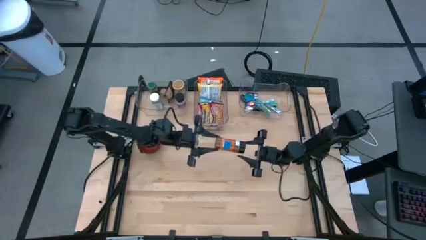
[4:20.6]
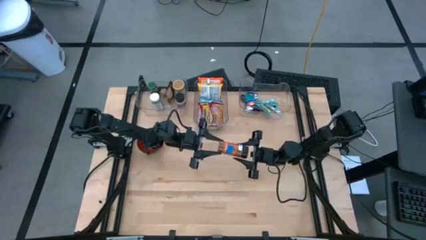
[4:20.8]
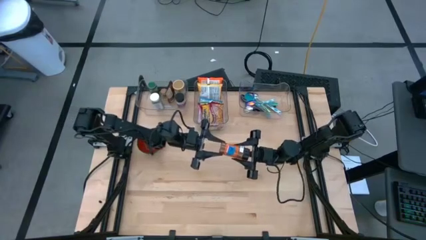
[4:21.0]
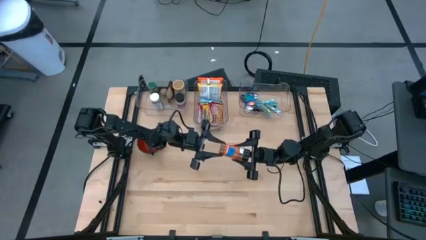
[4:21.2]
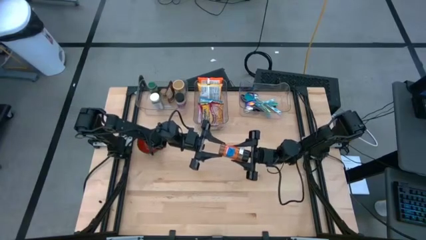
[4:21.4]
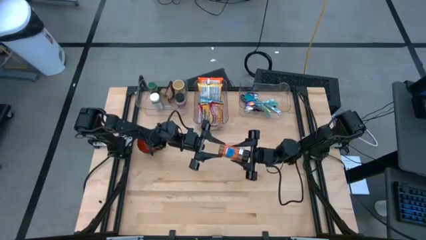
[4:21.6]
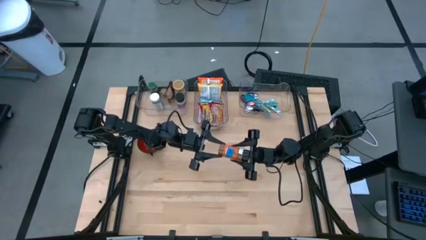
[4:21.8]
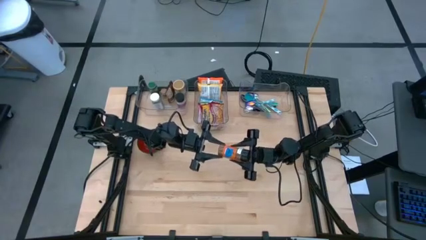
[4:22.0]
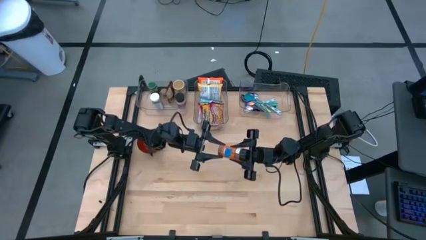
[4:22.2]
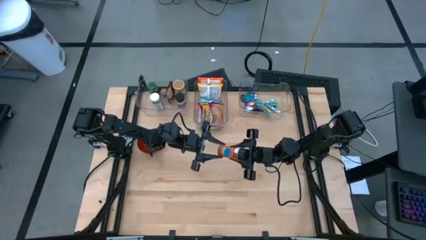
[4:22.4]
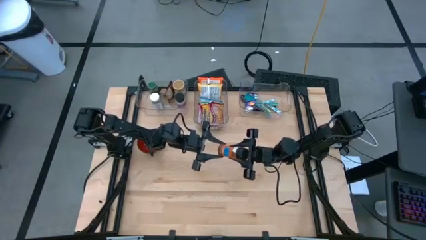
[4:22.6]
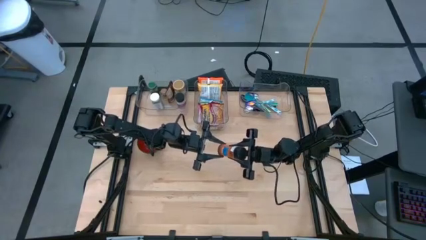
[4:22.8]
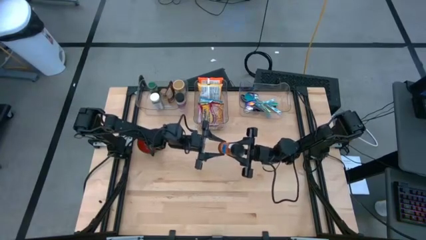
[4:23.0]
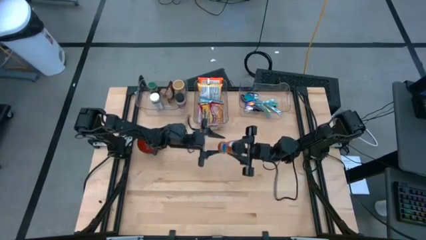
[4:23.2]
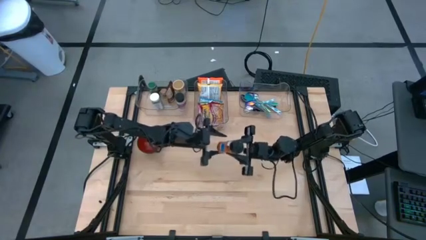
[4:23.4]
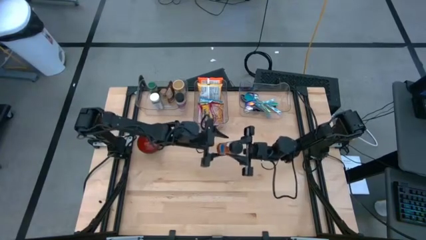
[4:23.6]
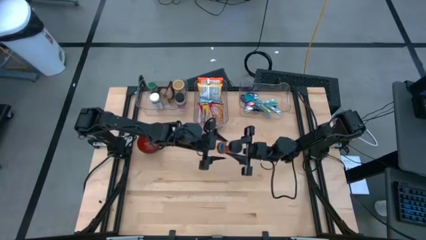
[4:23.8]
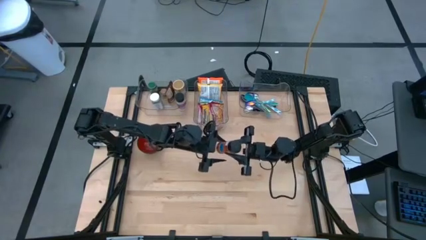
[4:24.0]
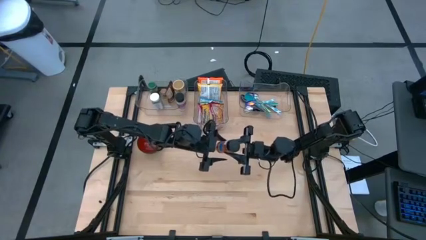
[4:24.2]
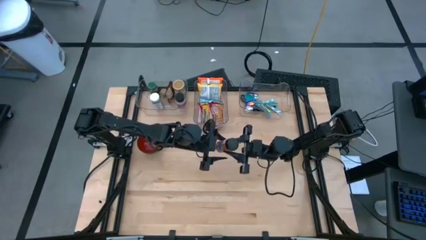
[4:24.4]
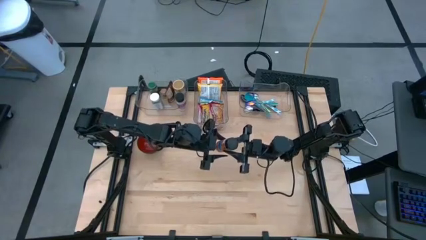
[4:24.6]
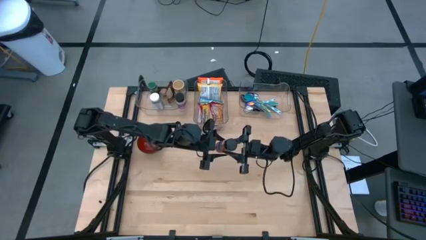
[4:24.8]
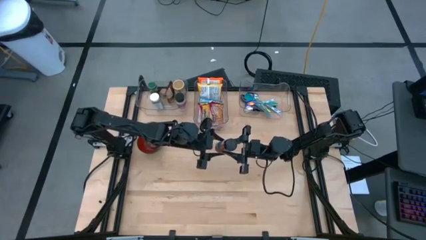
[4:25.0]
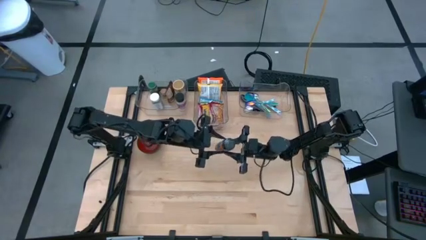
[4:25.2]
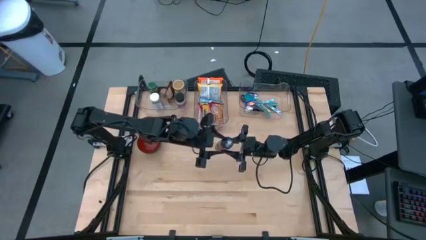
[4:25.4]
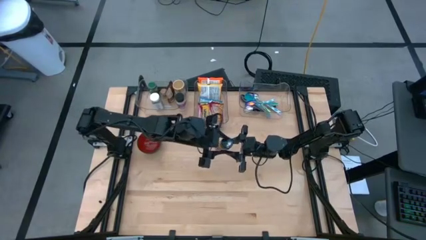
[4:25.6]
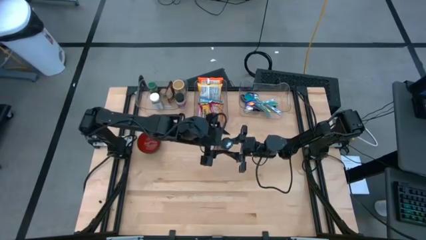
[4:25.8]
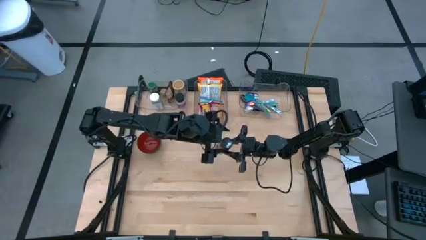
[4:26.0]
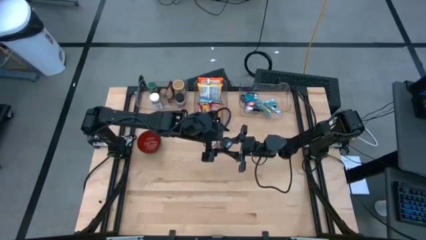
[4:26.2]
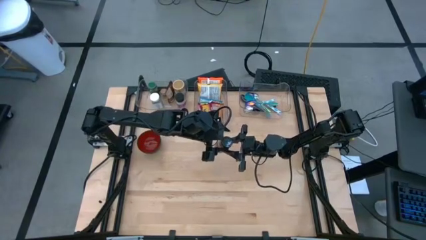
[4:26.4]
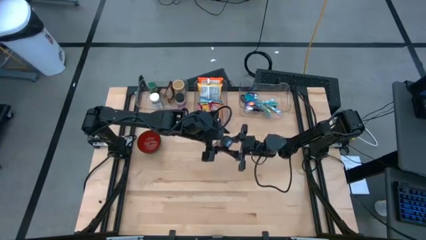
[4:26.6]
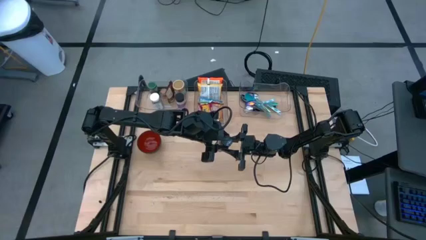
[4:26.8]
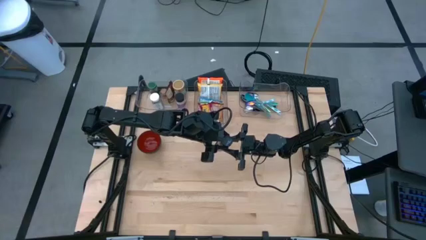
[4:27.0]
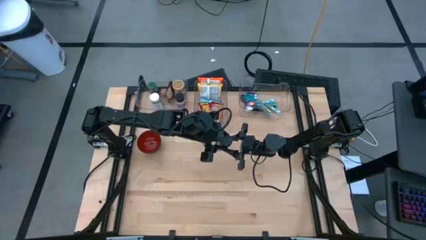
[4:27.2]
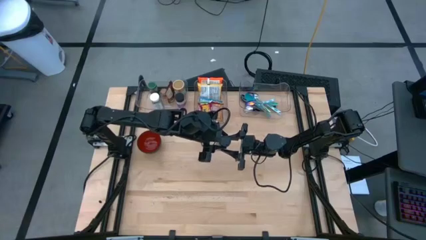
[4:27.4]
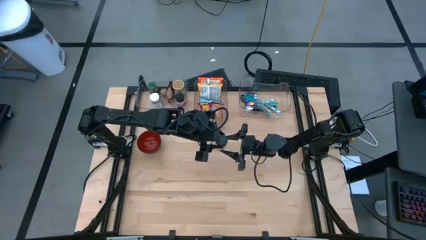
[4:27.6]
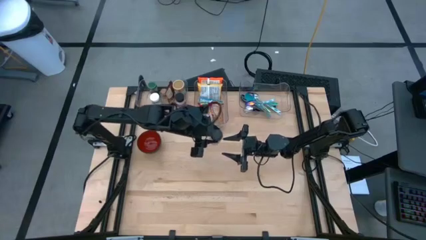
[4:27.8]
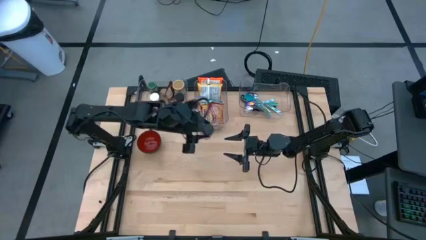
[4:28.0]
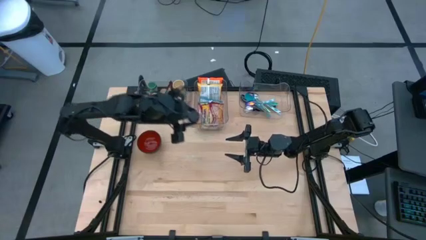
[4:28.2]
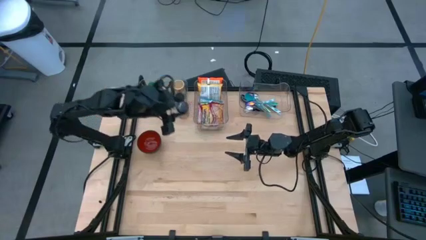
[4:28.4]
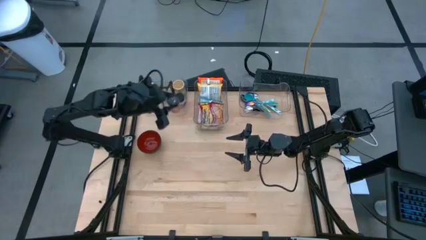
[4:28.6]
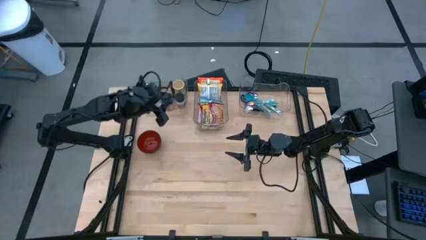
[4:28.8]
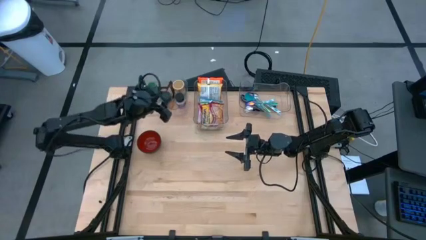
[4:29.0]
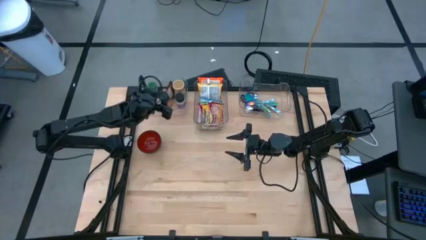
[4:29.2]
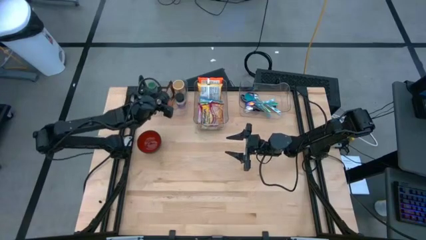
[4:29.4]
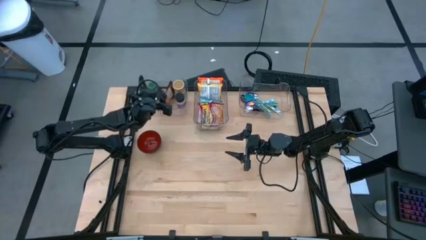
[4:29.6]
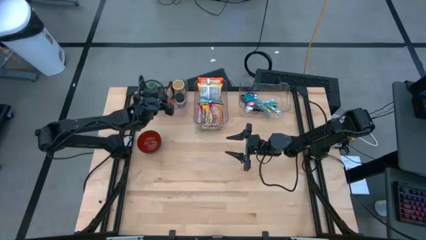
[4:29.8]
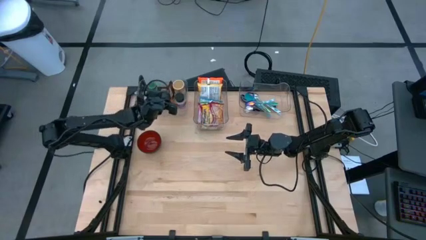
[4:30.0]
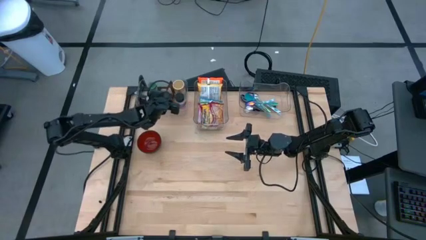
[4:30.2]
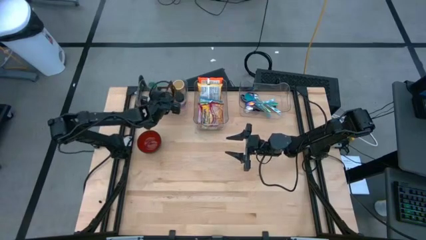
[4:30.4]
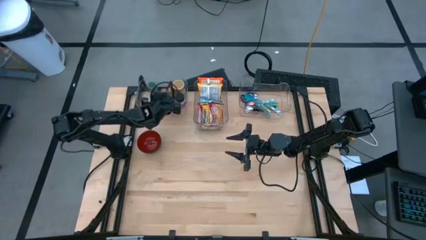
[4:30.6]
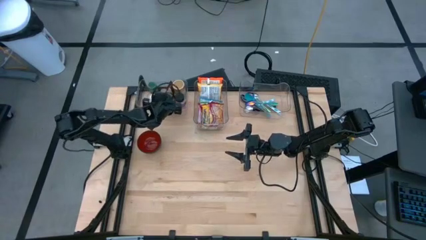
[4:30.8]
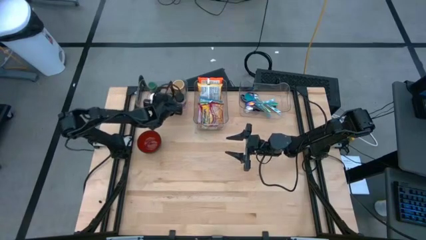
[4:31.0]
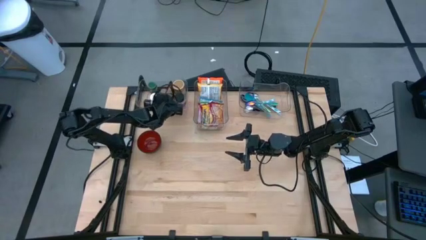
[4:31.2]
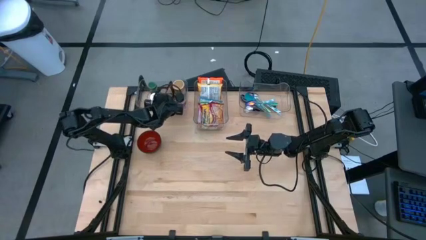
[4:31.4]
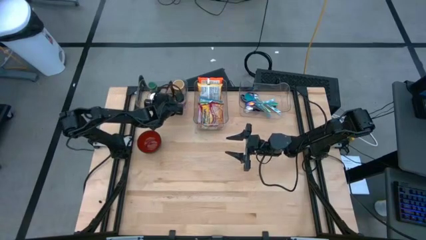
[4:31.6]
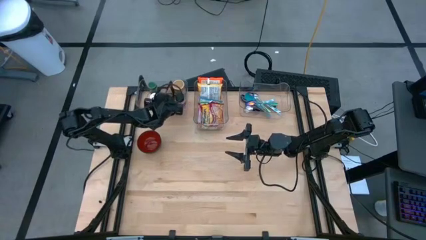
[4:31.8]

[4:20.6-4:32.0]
Task: Pick & Place Food Item
Put the orange seasoning bottle into the left transparent bin

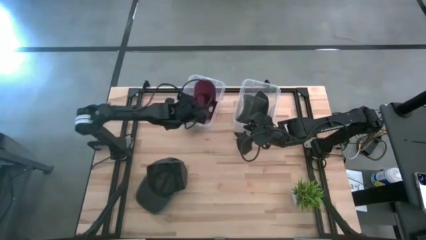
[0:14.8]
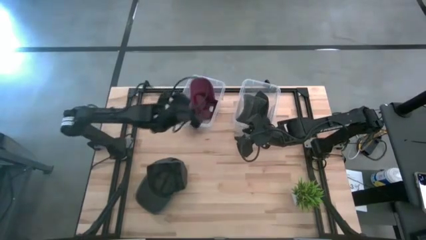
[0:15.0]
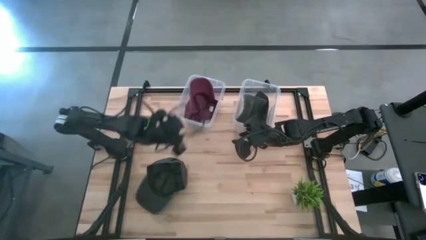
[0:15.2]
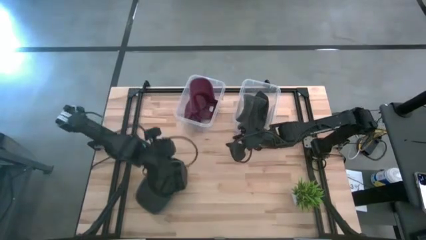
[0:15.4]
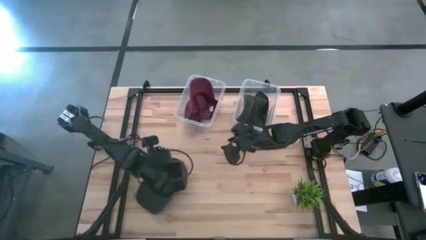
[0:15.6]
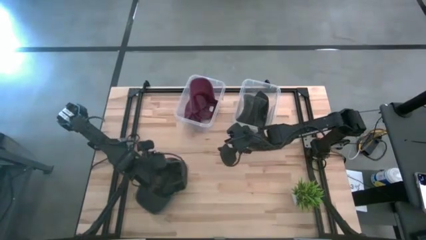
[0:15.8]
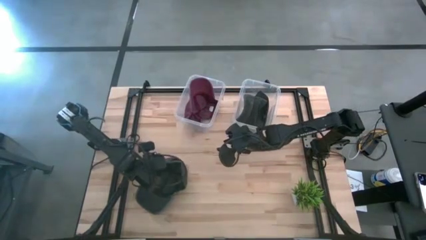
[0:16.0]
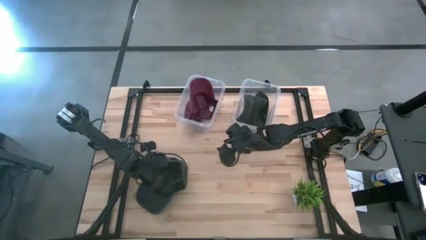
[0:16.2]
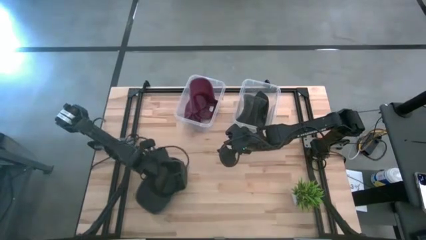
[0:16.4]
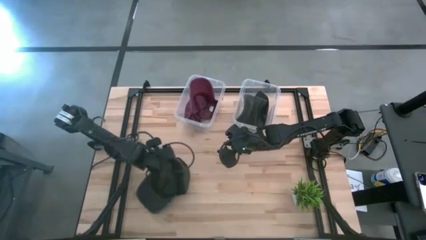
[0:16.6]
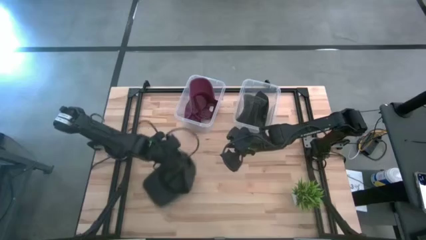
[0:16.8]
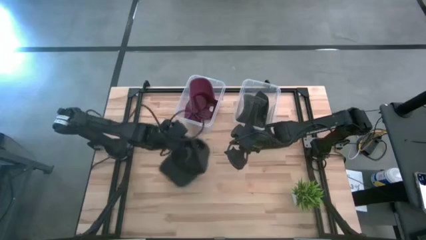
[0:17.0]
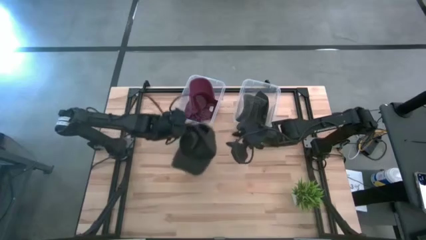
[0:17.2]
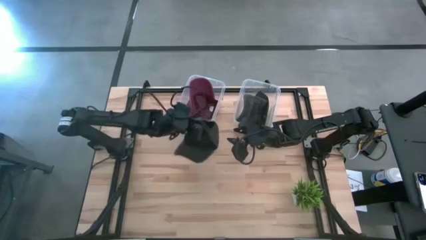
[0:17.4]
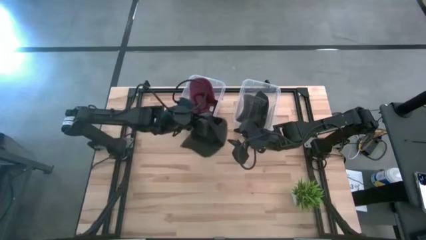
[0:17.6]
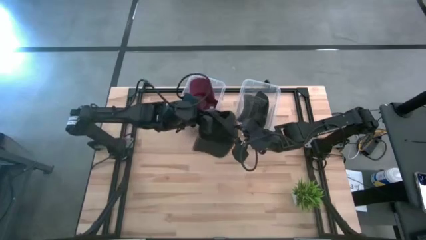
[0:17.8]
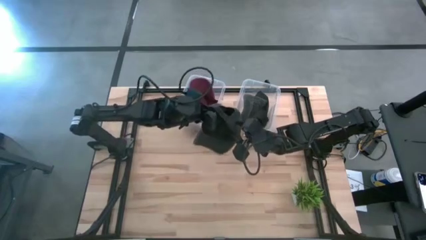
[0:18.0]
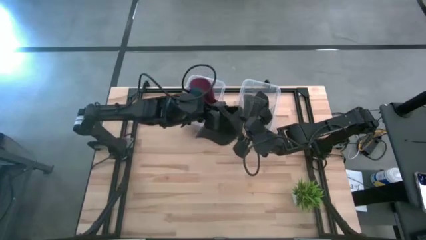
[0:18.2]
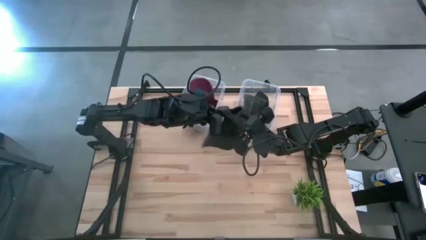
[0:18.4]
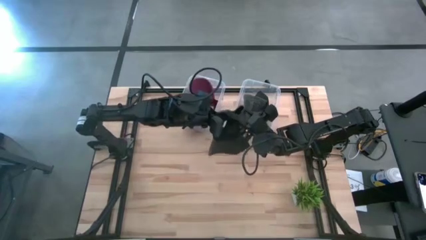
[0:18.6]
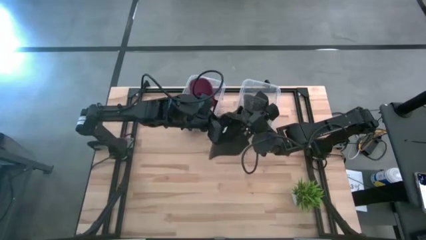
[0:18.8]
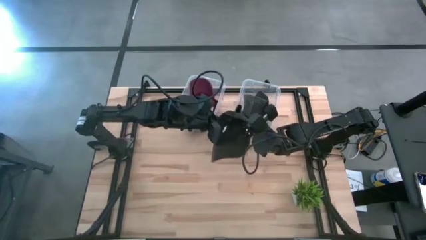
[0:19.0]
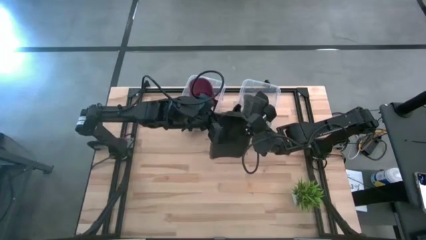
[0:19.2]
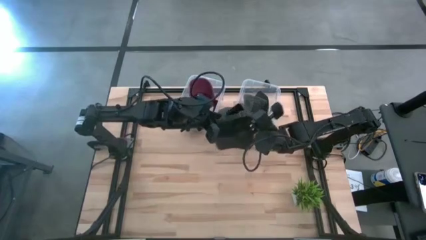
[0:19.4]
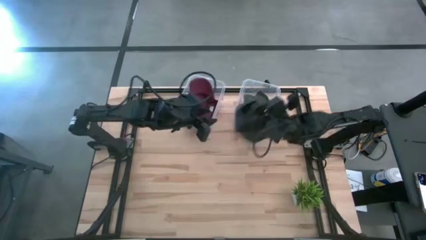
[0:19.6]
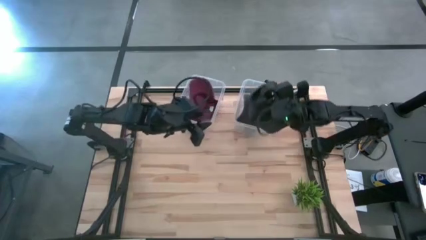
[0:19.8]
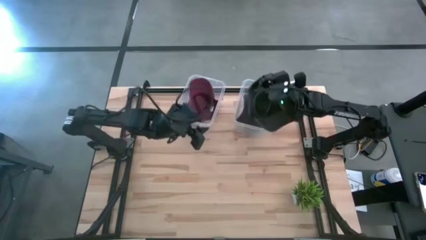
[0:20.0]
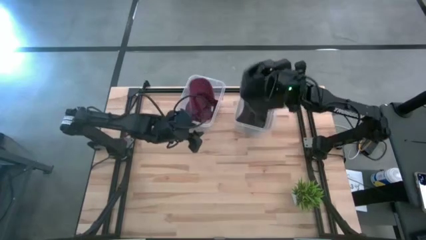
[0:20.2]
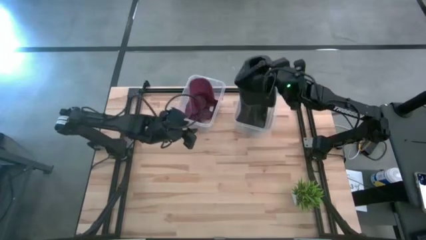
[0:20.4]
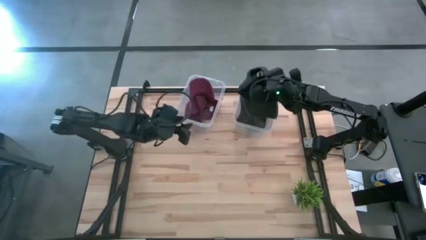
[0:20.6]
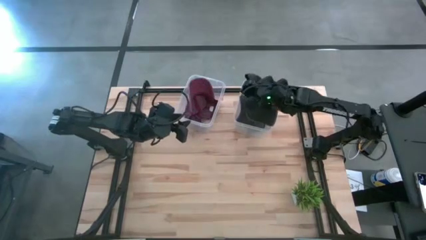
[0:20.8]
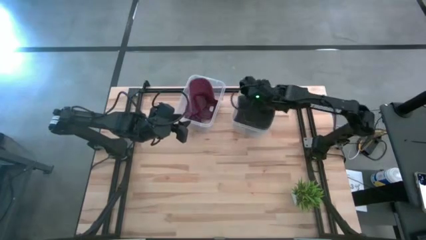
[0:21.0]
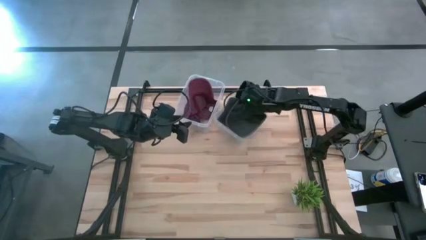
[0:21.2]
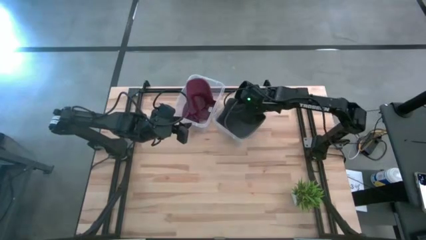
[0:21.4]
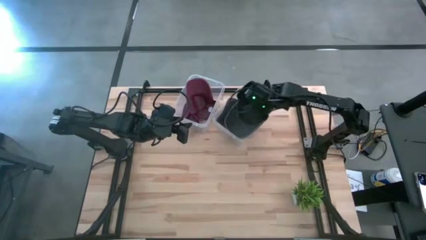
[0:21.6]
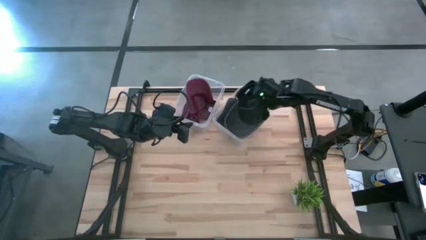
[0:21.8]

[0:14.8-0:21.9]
Task: Pick & Place hat
Put the black cap into the right transparent bin
